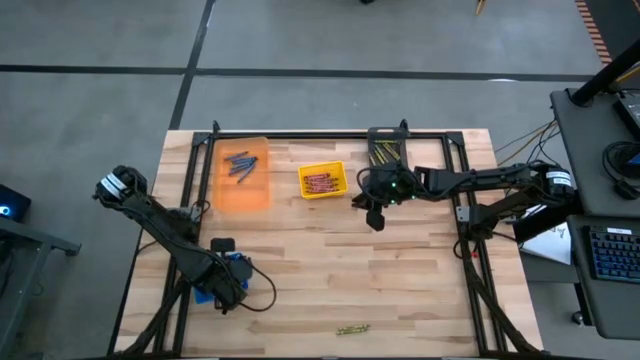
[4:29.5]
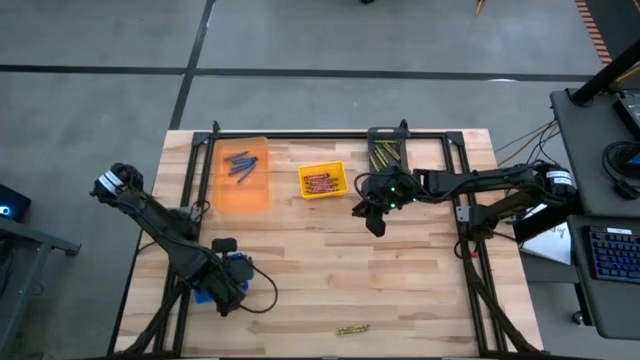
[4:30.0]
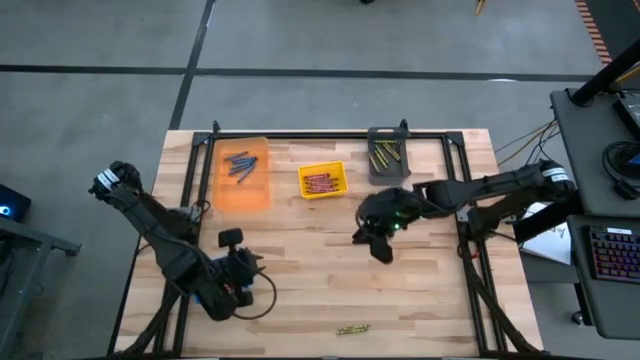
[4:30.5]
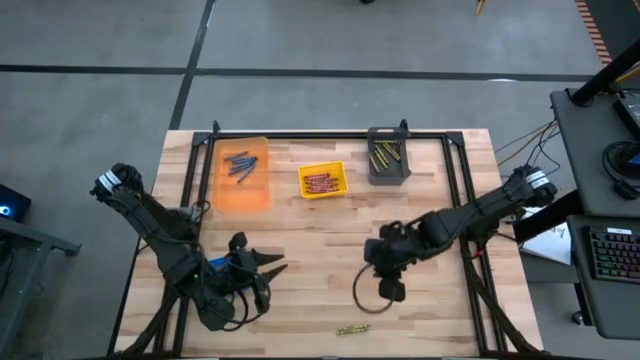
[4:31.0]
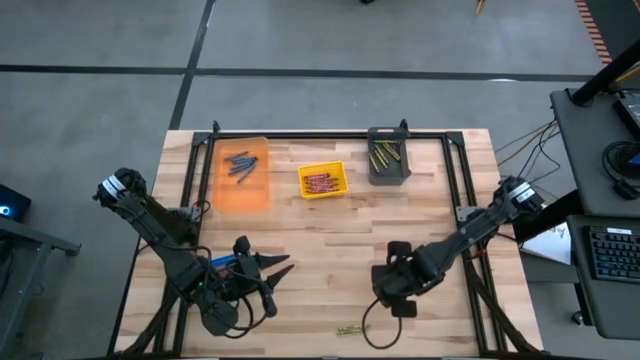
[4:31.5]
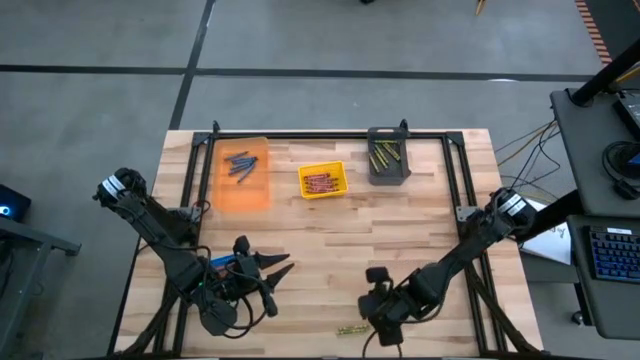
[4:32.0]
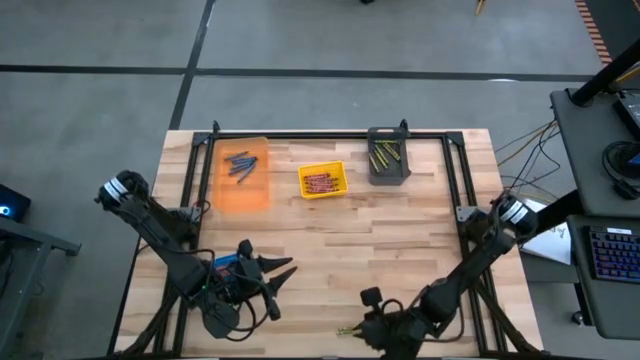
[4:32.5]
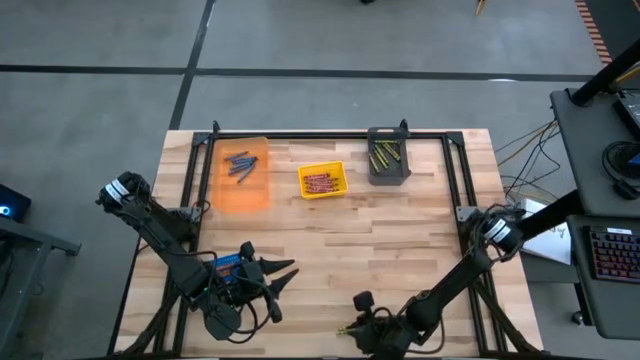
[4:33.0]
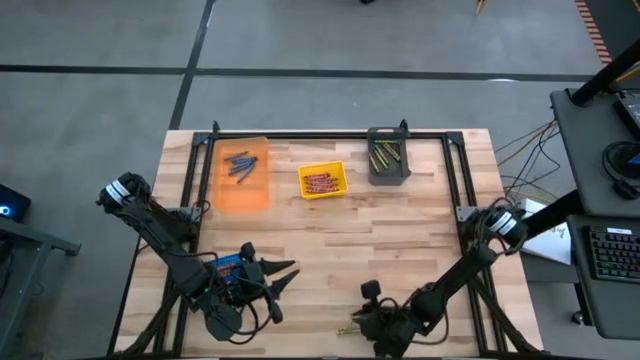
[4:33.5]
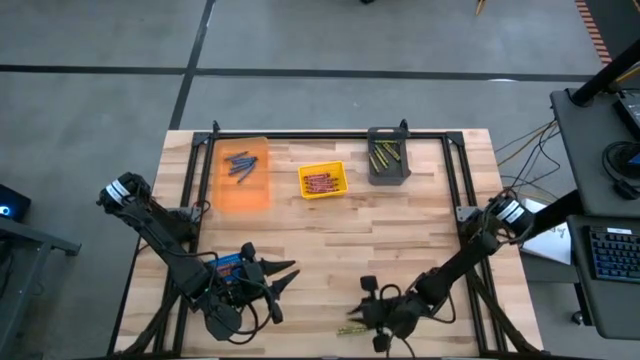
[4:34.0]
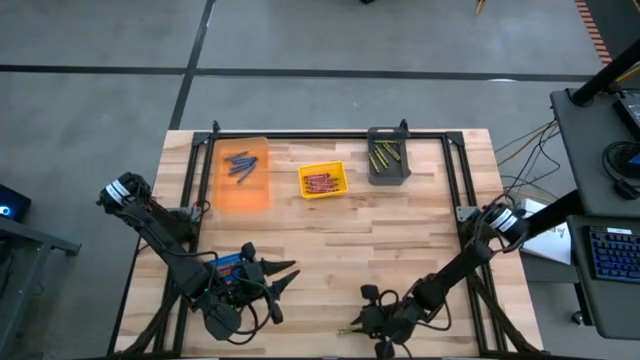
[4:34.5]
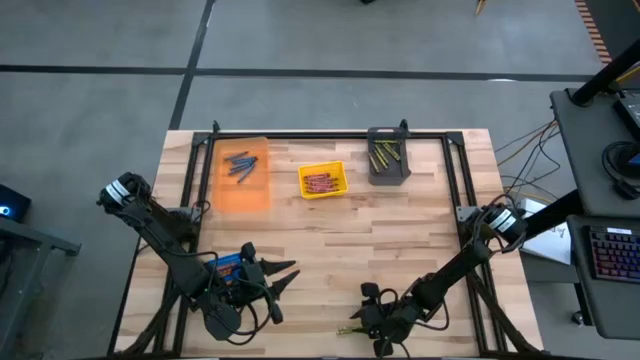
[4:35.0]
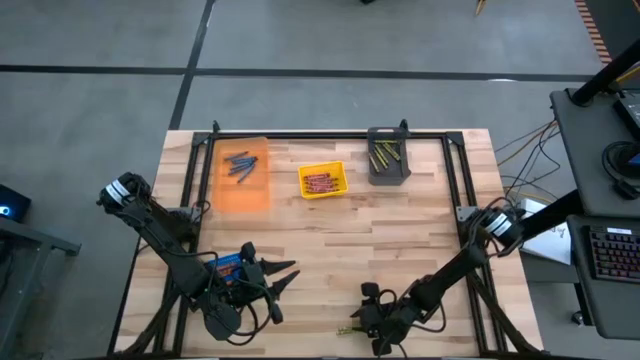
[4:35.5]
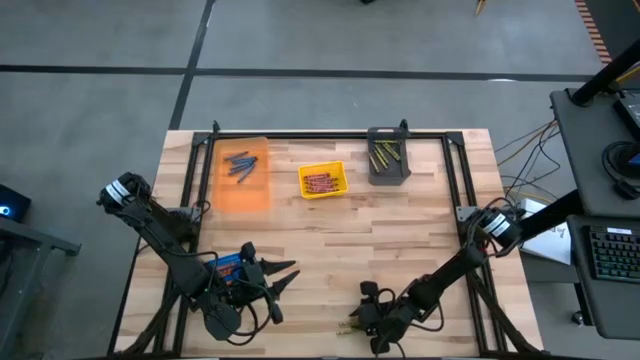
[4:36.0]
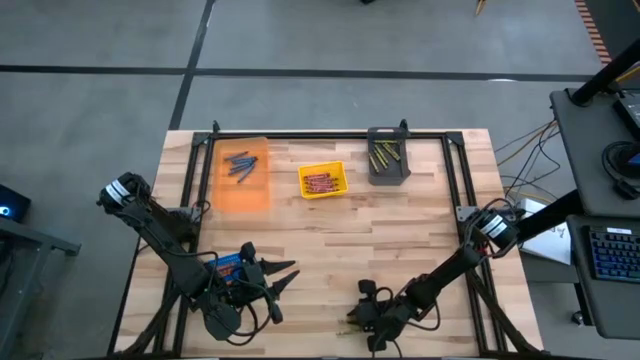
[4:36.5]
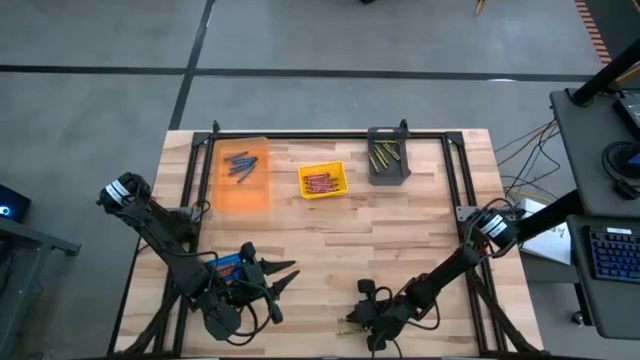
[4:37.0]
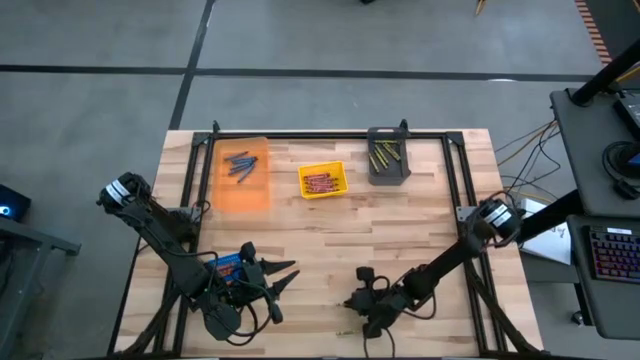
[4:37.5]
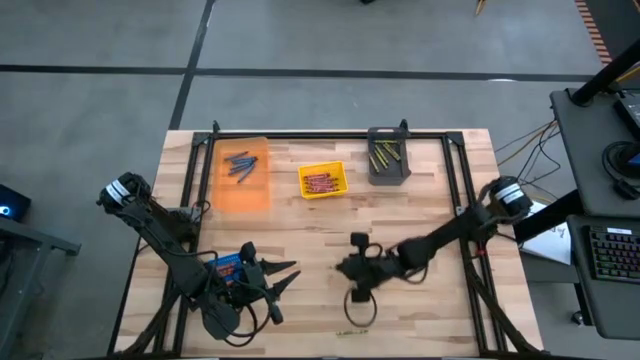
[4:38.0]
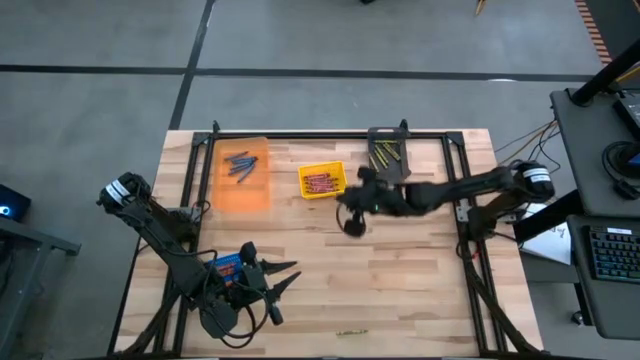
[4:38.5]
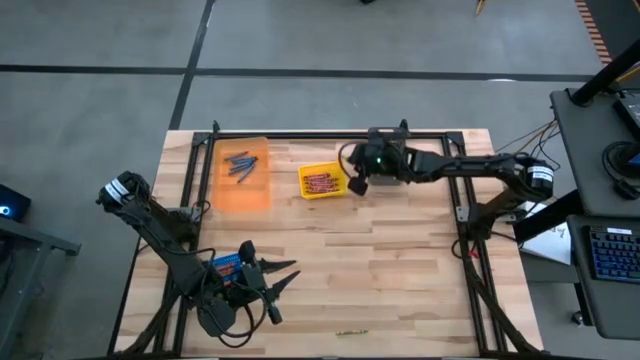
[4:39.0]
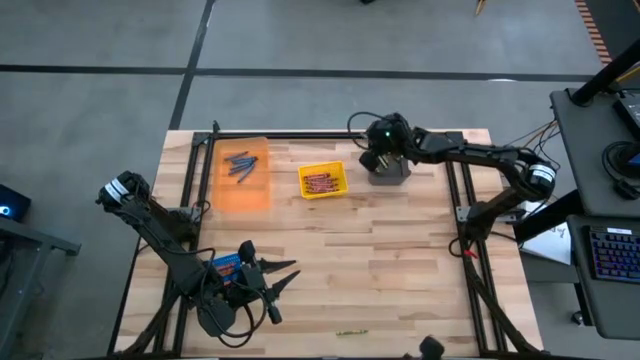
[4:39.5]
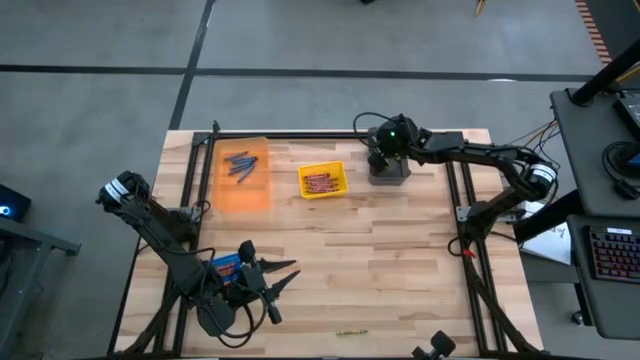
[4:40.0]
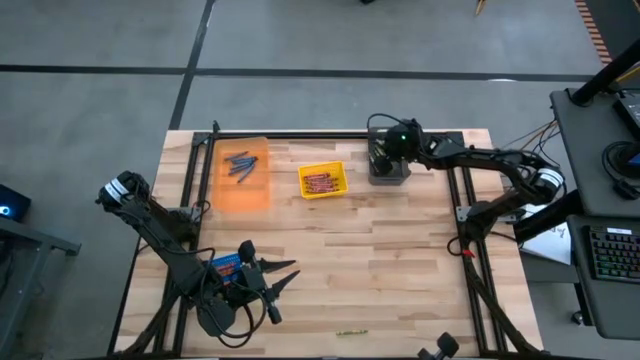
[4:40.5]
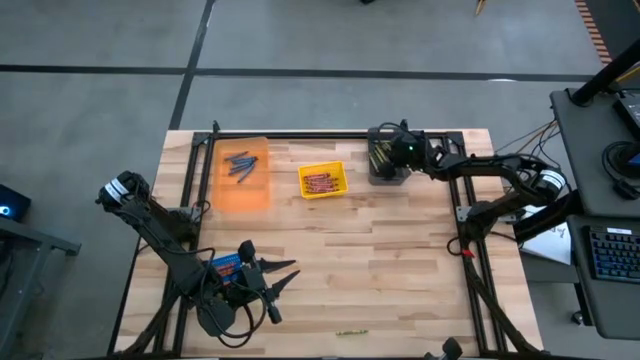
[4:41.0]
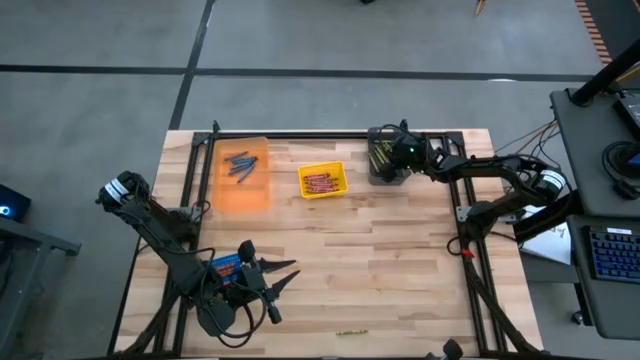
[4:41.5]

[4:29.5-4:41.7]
Task: Sort crayons
Put the green crayon into the black bin

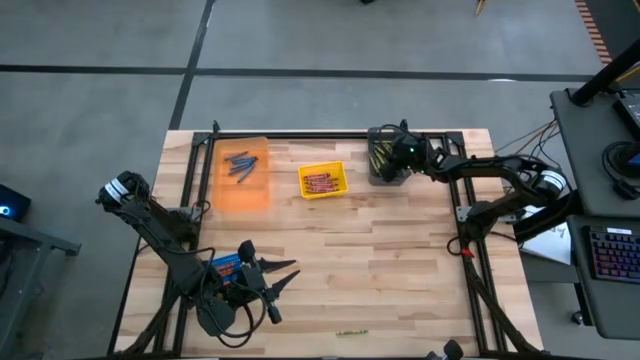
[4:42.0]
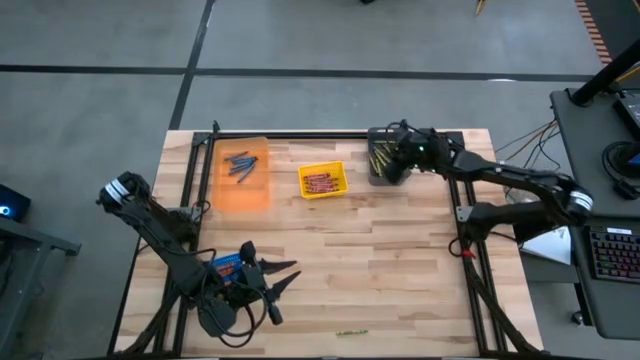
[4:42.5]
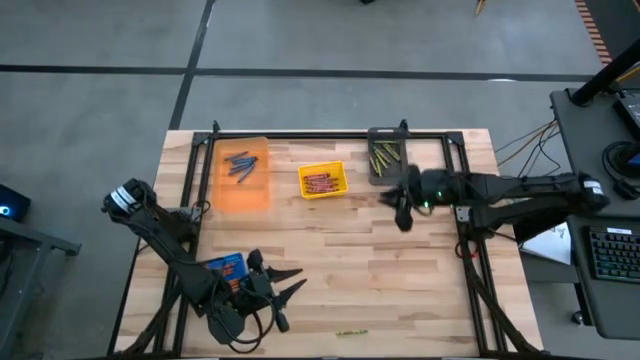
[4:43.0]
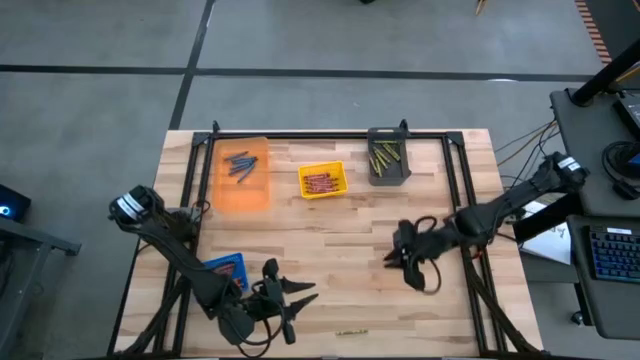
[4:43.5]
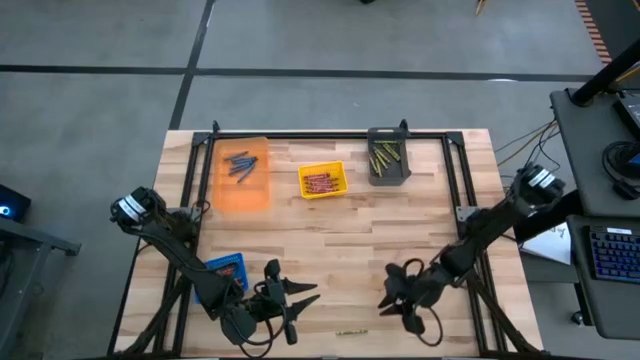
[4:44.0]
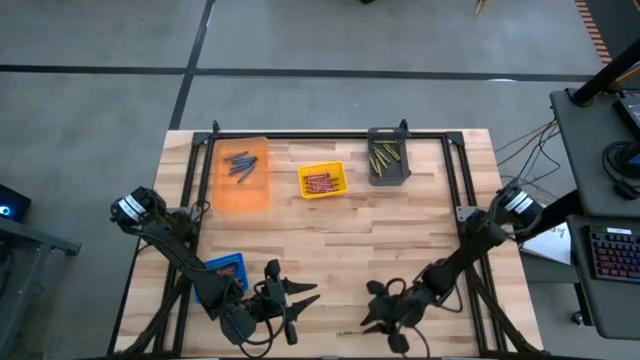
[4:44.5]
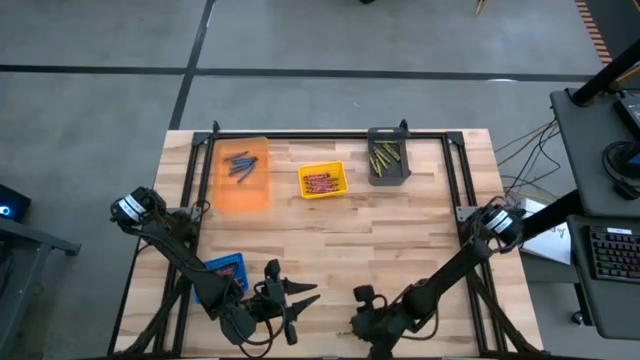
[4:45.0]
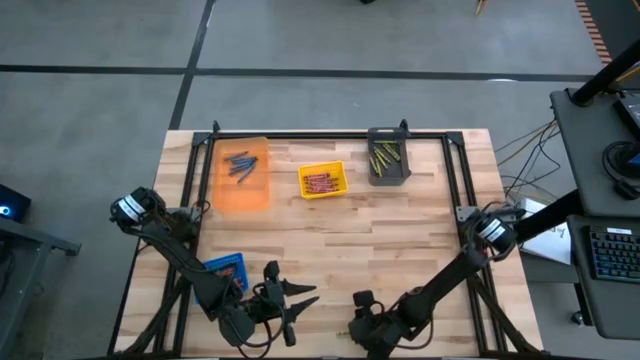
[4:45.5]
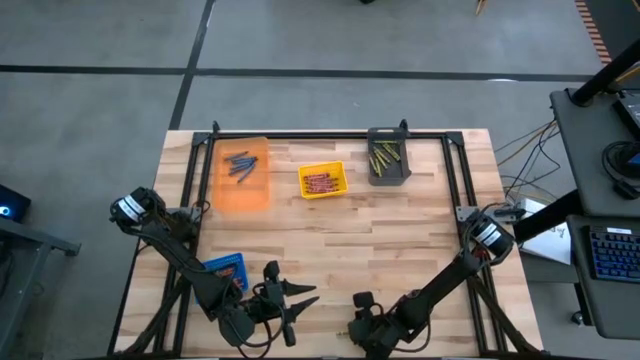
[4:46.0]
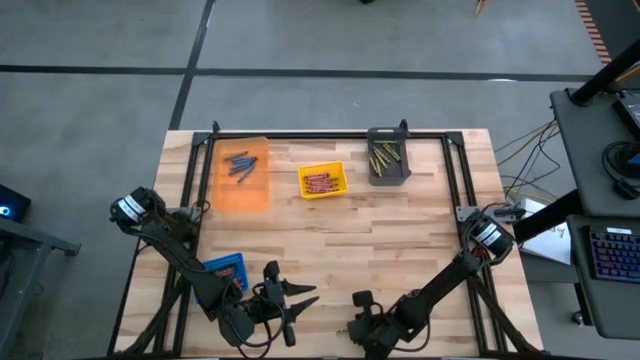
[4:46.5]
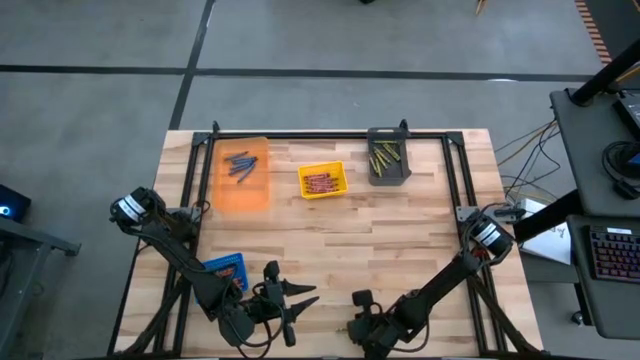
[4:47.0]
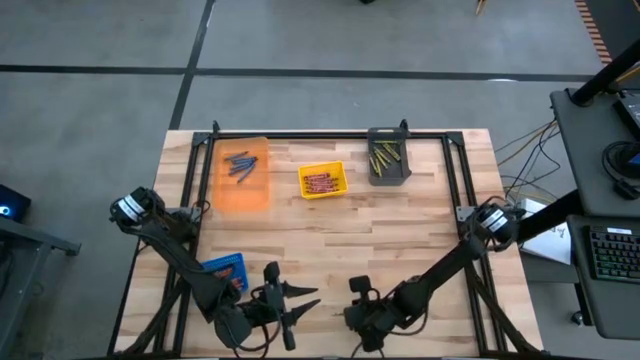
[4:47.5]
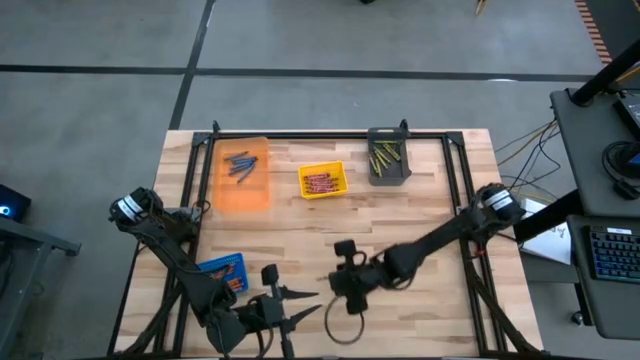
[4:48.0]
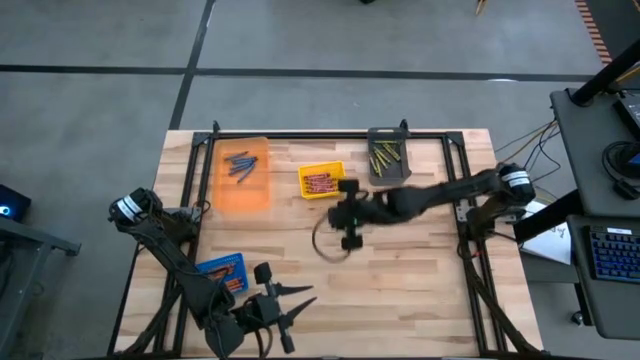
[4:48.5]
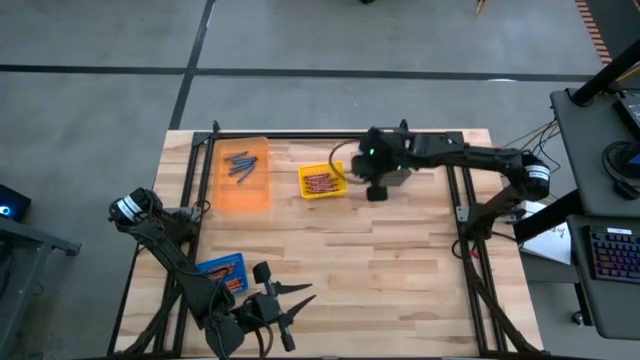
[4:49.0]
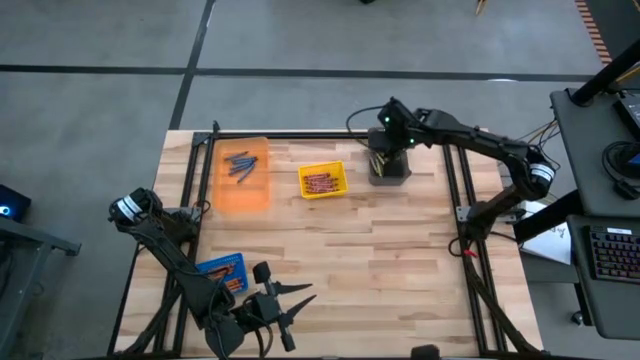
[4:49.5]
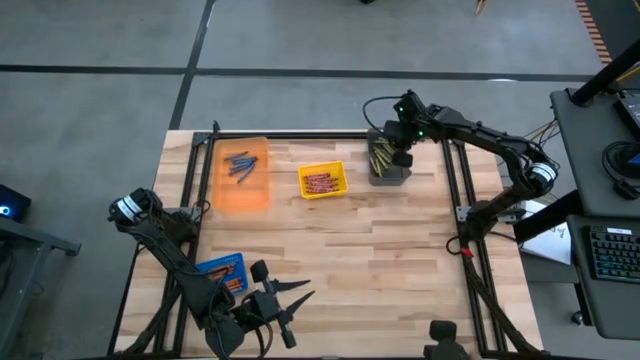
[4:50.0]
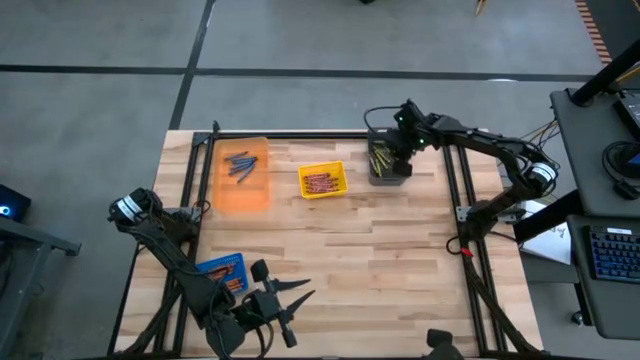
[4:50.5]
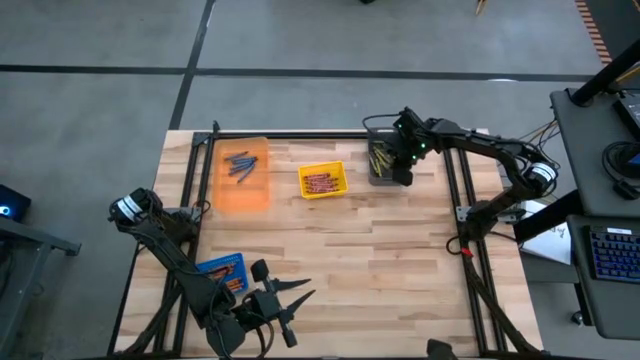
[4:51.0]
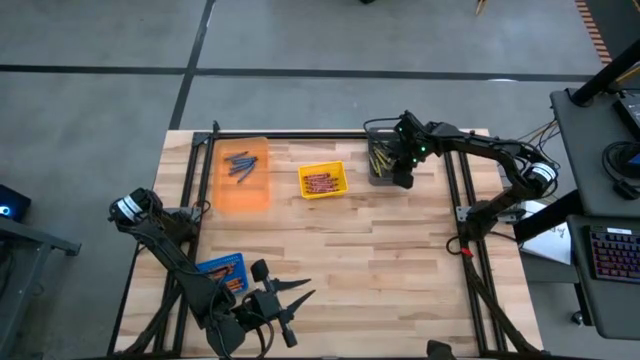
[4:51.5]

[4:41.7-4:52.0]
Put the green crayon into the black bin
